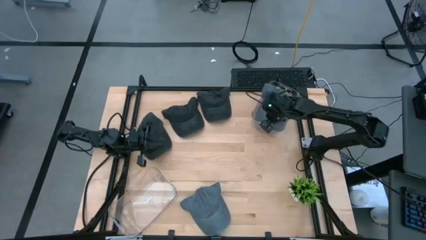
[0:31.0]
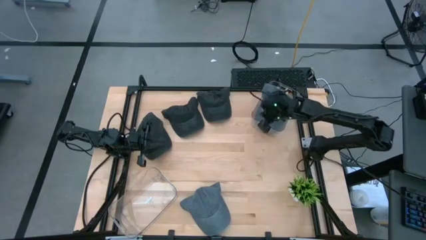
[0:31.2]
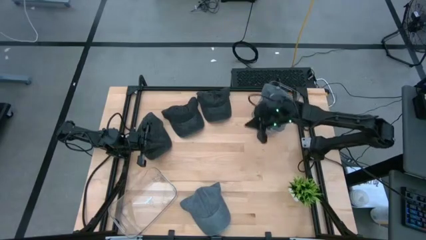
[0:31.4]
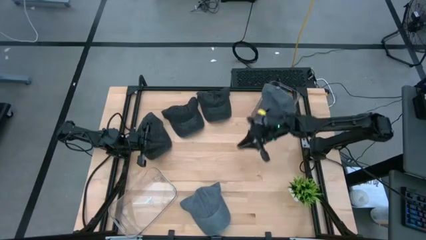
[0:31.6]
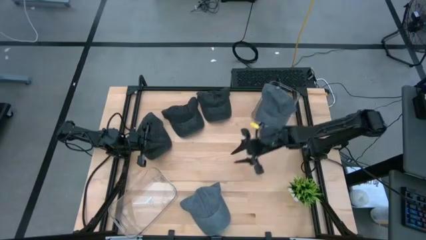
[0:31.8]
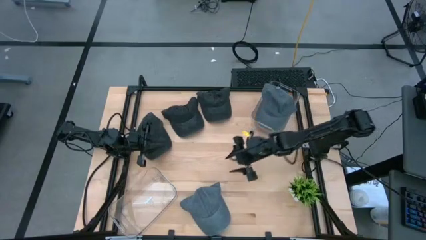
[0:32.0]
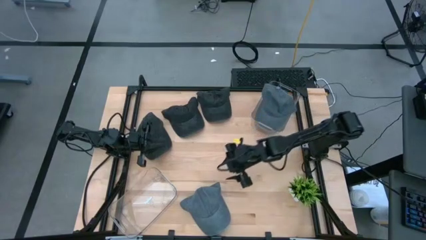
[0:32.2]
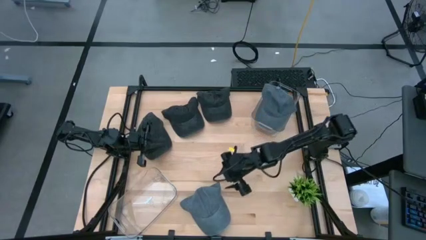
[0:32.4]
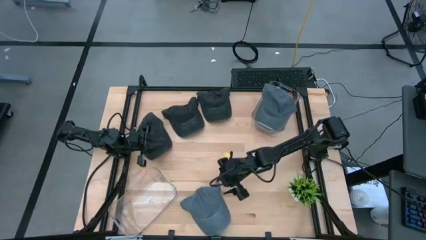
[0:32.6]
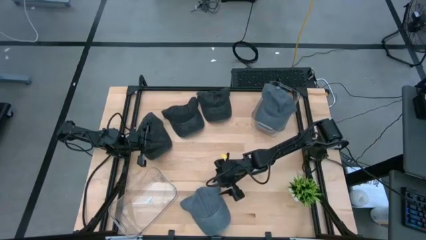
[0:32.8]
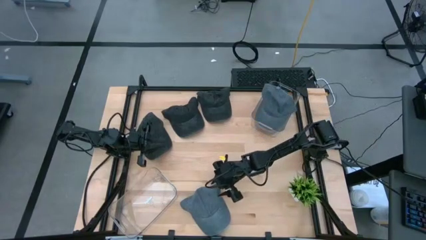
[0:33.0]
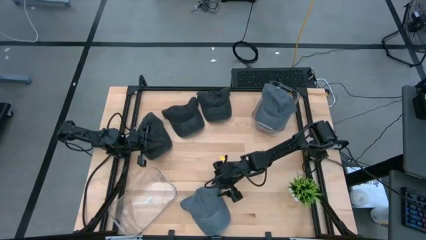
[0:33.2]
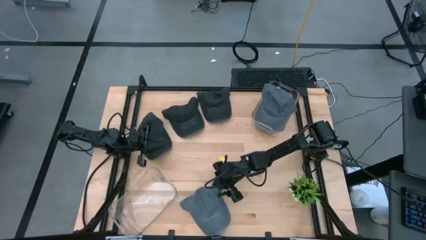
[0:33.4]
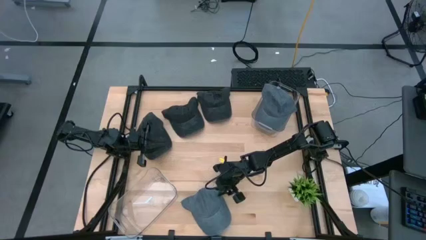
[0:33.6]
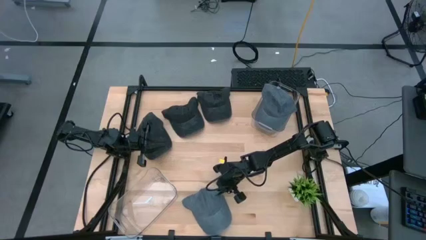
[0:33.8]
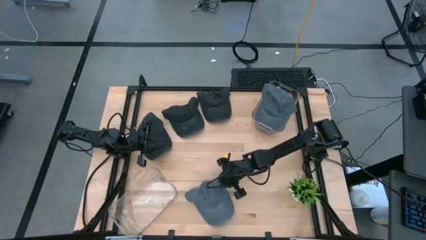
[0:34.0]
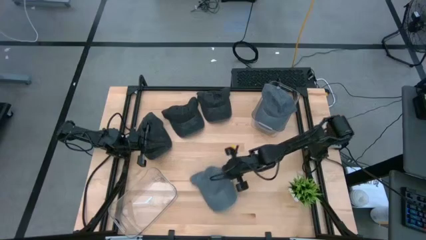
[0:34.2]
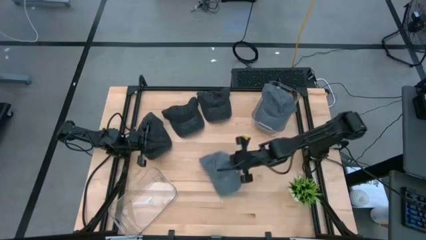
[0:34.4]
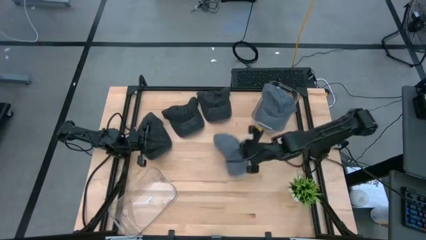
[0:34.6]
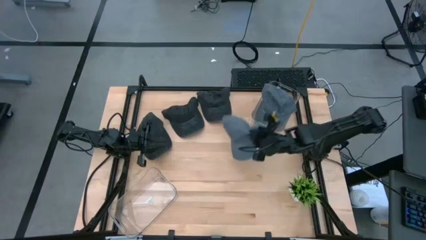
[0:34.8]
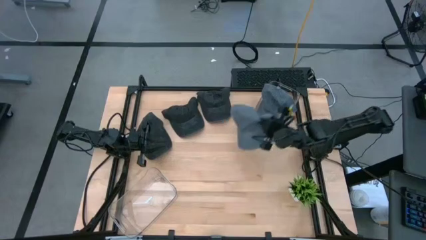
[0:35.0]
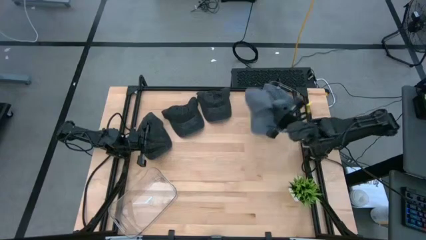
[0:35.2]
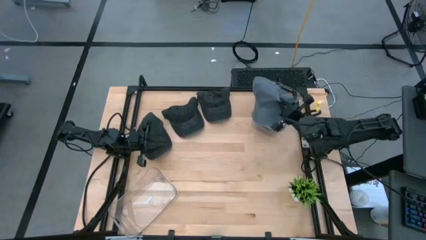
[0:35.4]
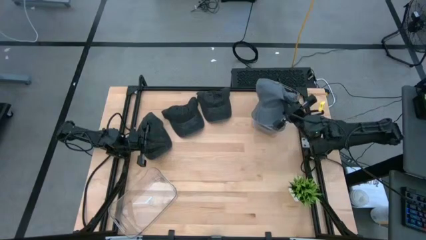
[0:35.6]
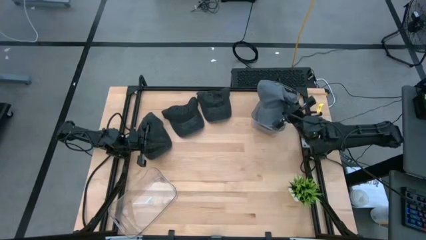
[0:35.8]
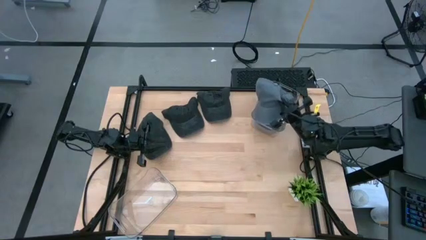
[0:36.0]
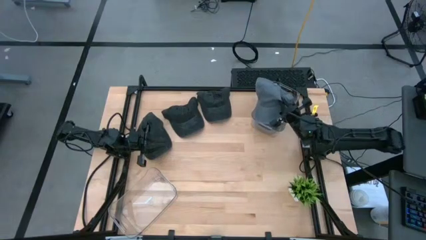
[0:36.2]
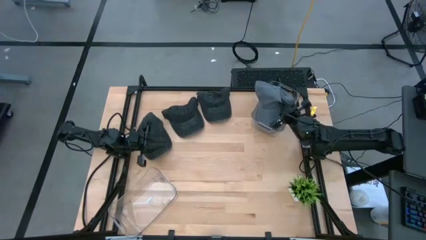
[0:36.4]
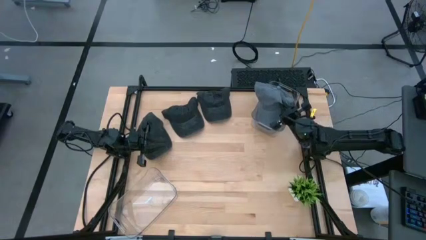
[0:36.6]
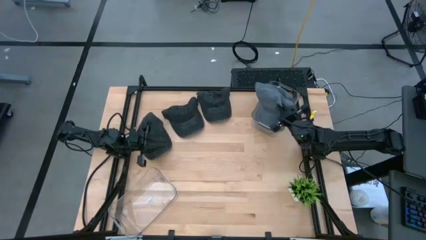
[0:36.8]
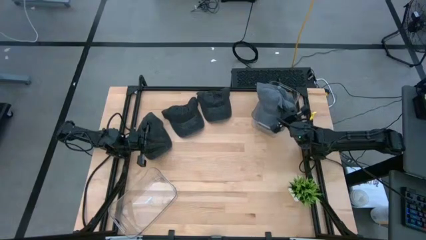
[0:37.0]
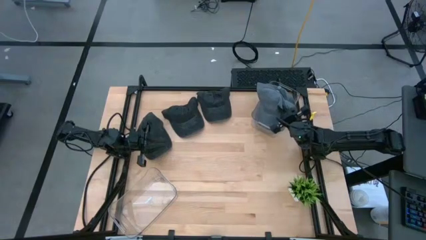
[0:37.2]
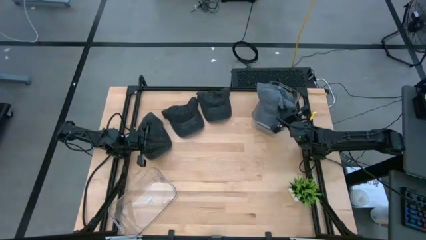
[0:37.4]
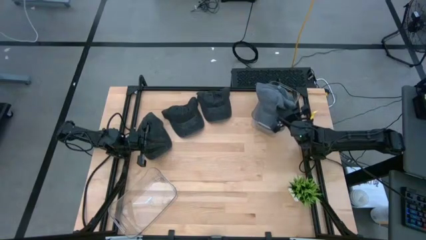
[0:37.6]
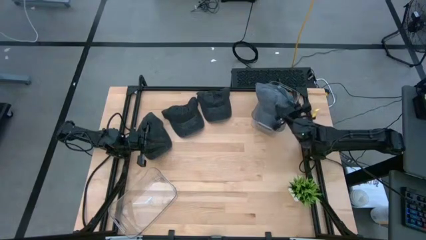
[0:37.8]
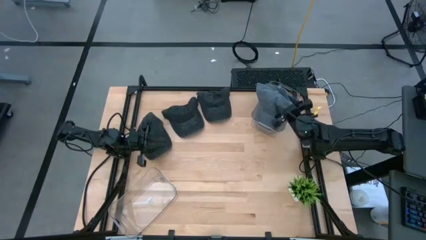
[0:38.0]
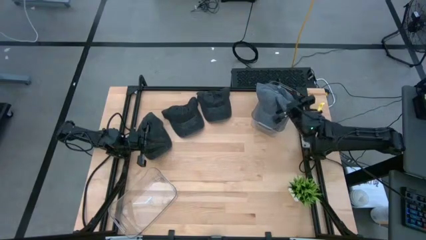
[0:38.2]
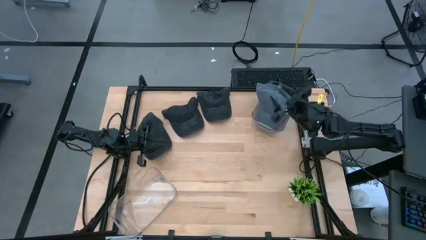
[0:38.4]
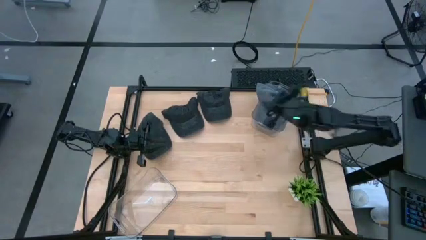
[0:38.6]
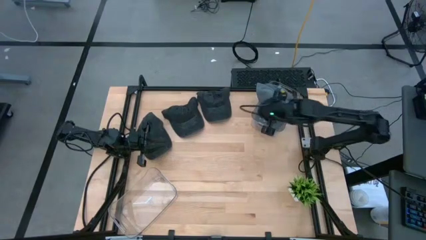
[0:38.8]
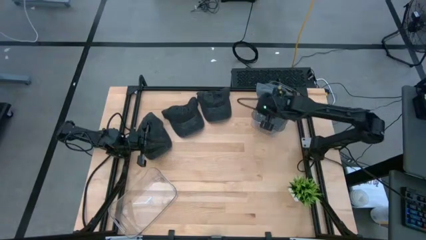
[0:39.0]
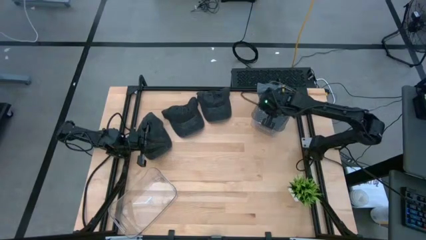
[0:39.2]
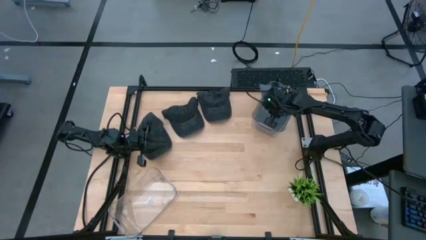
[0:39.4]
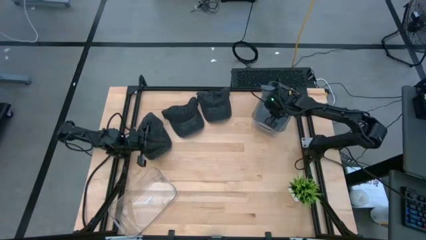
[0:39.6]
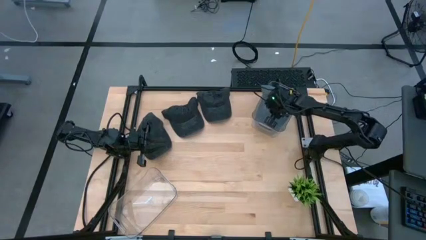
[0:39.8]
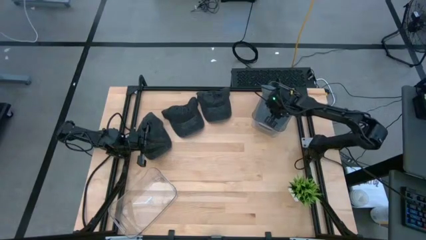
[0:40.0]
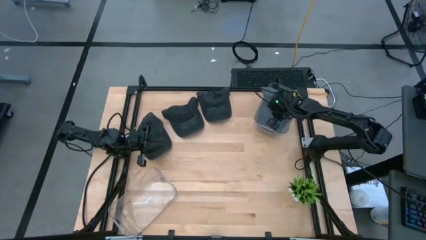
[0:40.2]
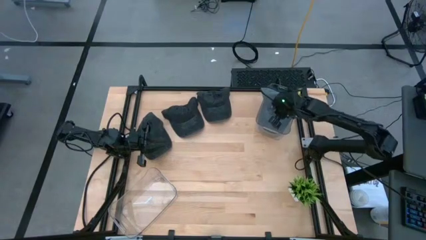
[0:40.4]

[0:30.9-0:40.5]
Task: Pick & Place hat
Put the gray cap into the top transparent bin
